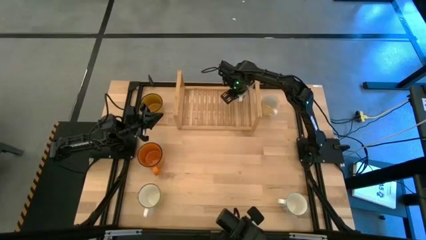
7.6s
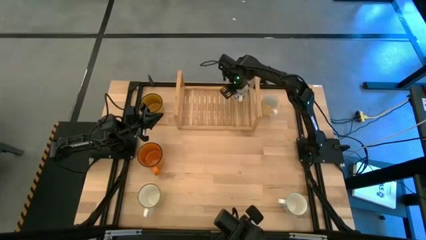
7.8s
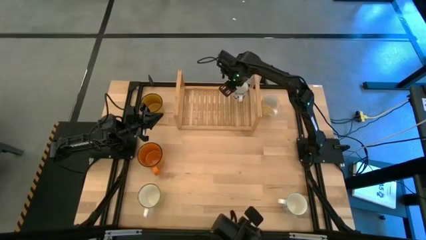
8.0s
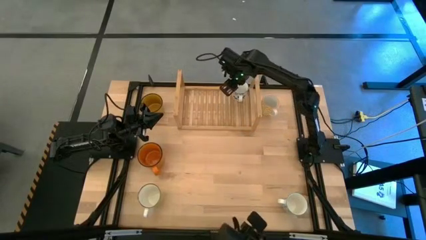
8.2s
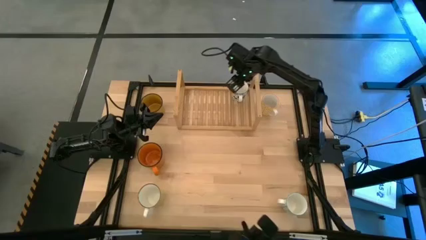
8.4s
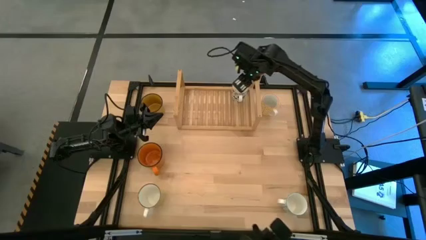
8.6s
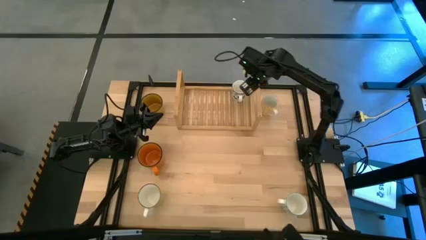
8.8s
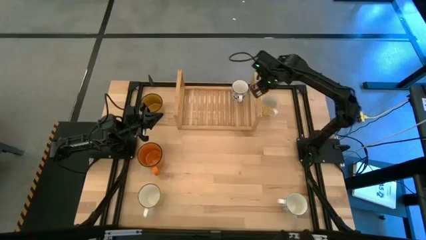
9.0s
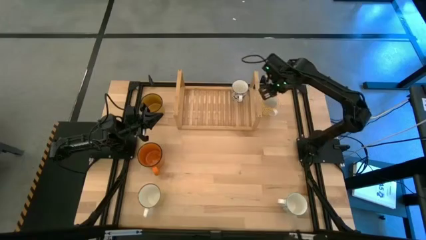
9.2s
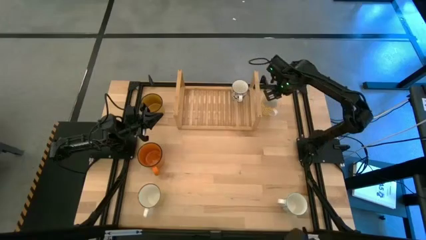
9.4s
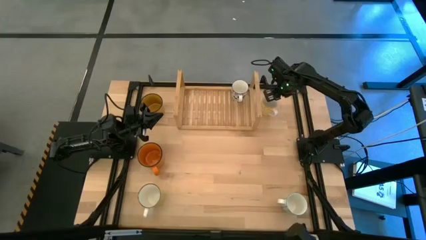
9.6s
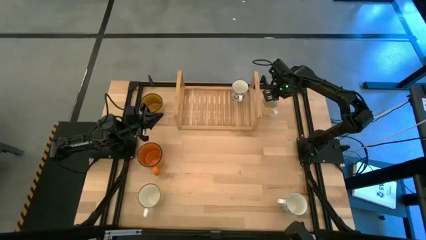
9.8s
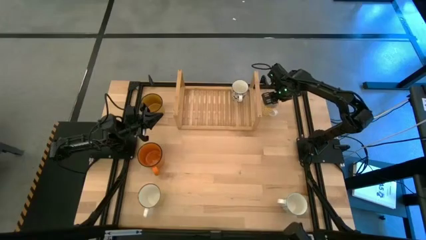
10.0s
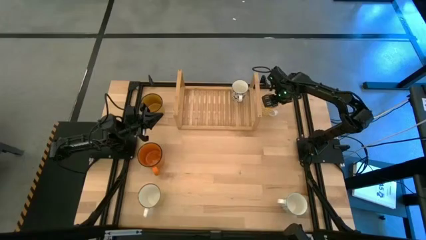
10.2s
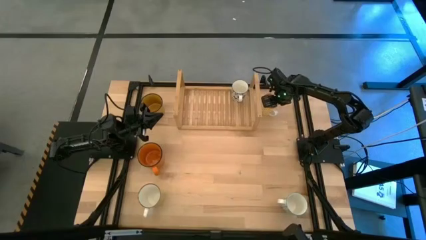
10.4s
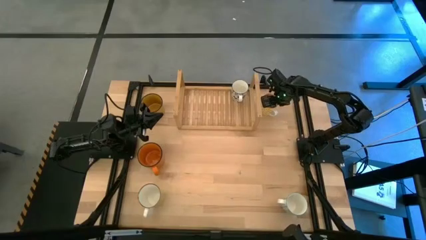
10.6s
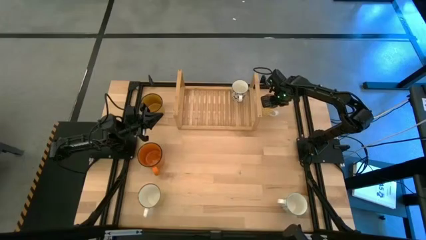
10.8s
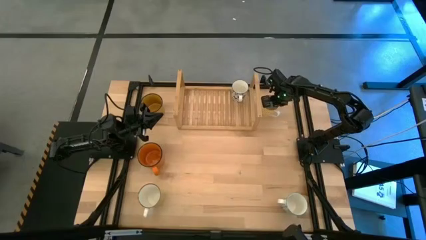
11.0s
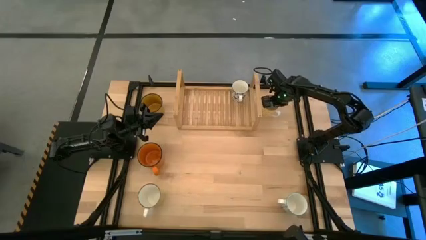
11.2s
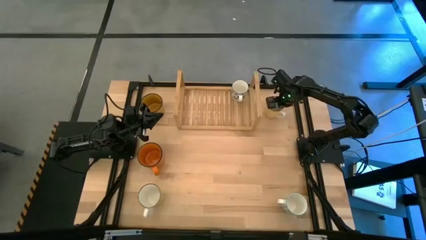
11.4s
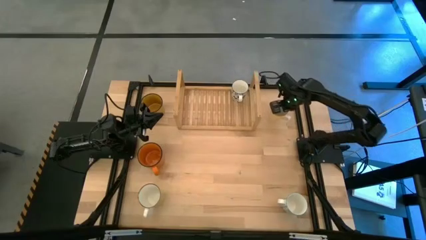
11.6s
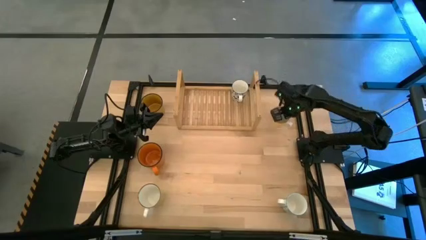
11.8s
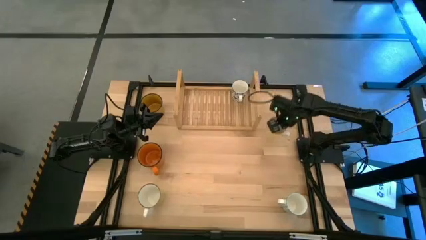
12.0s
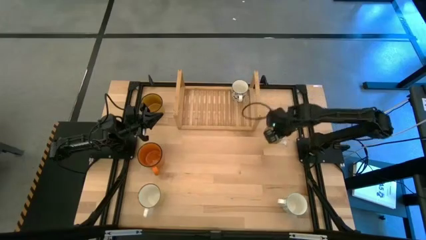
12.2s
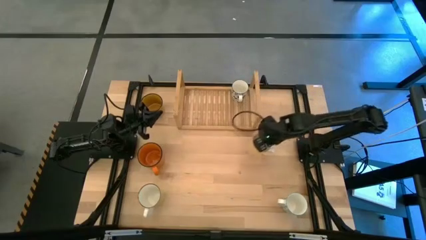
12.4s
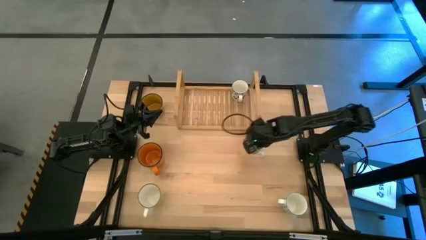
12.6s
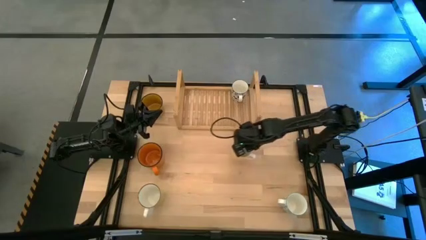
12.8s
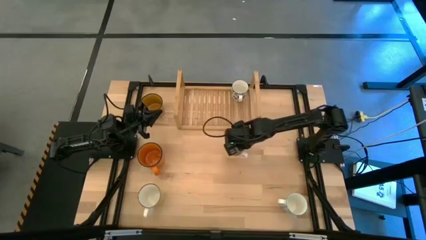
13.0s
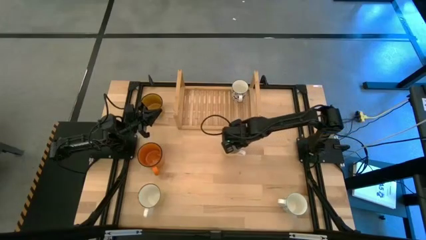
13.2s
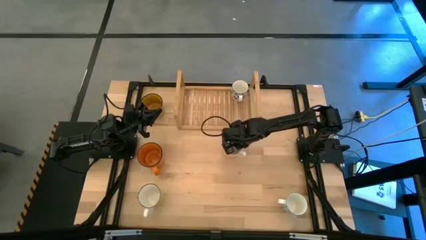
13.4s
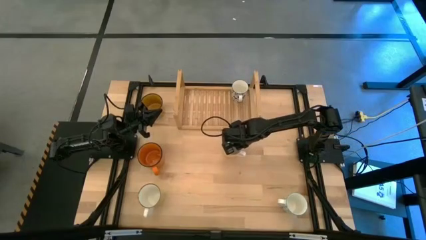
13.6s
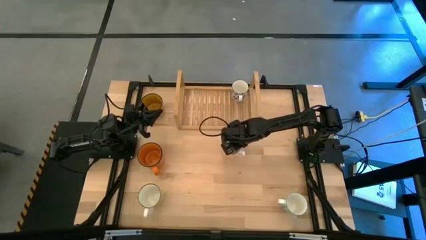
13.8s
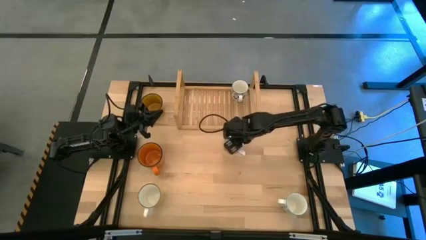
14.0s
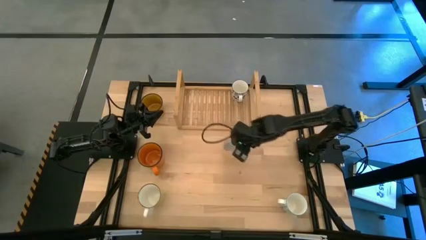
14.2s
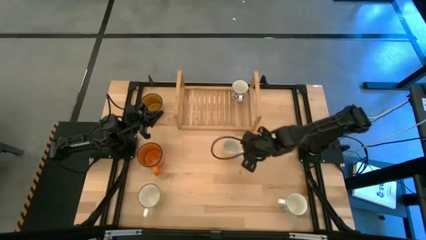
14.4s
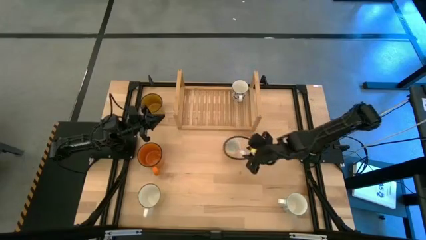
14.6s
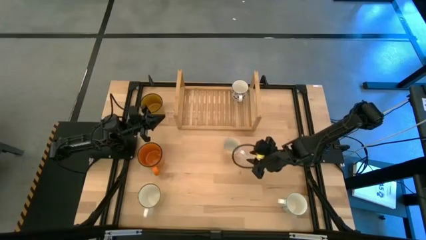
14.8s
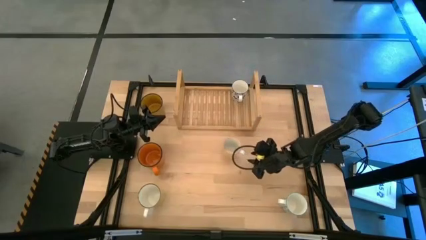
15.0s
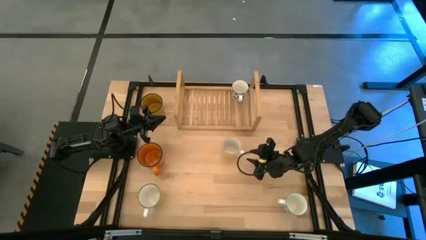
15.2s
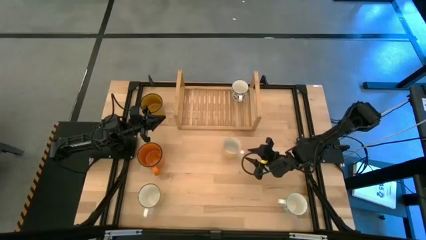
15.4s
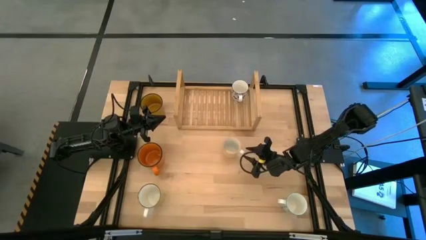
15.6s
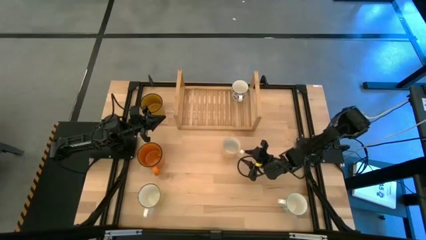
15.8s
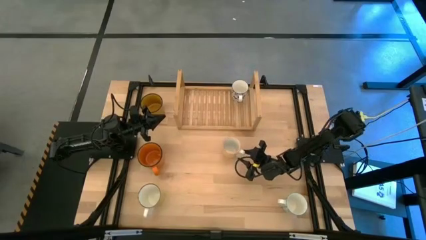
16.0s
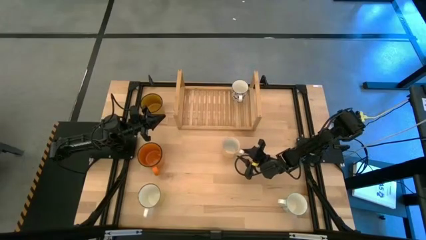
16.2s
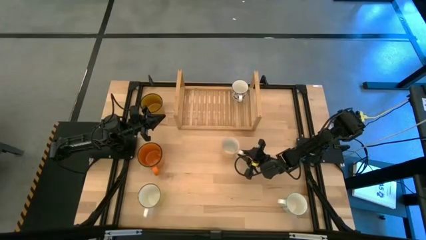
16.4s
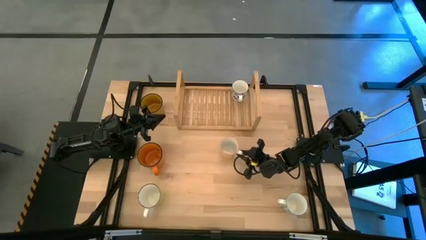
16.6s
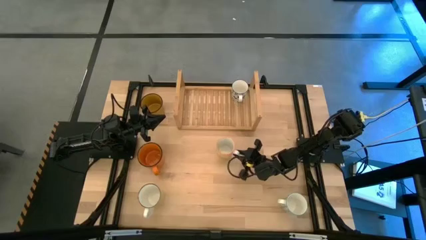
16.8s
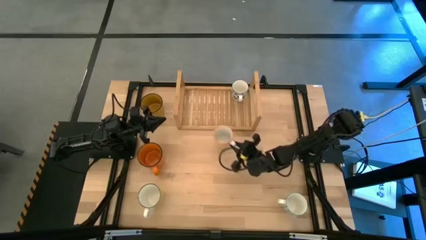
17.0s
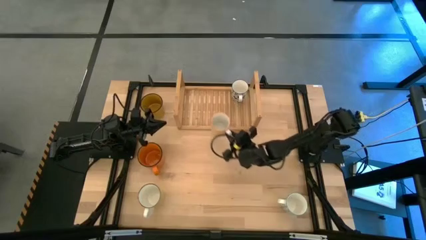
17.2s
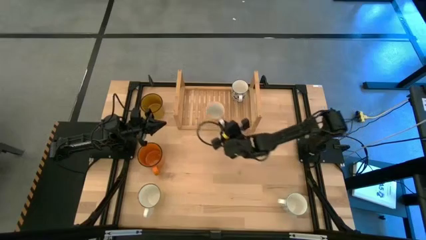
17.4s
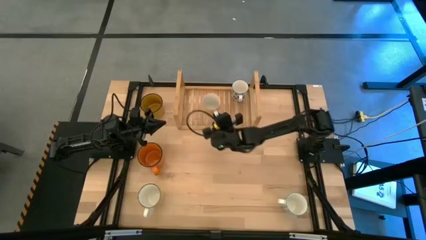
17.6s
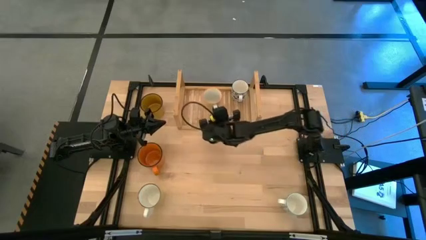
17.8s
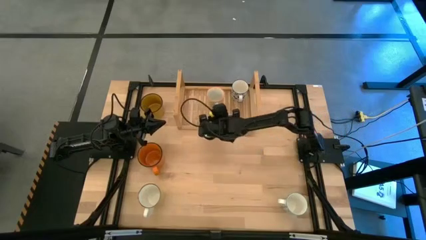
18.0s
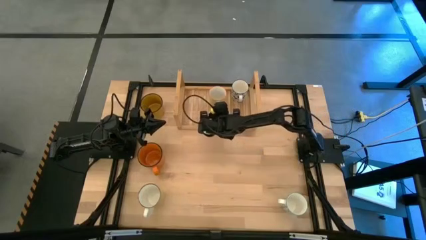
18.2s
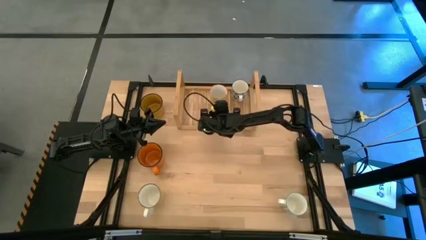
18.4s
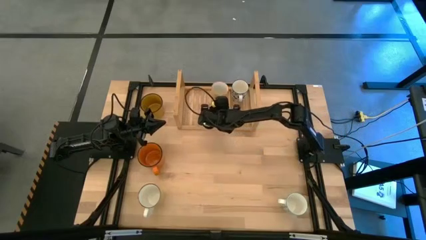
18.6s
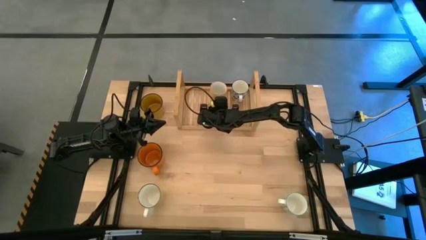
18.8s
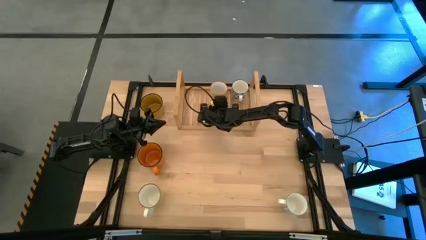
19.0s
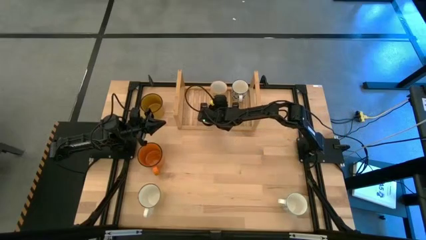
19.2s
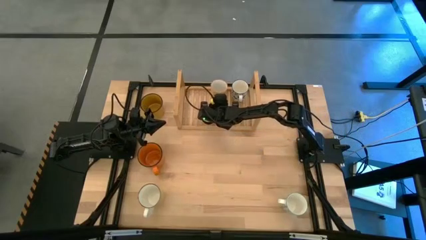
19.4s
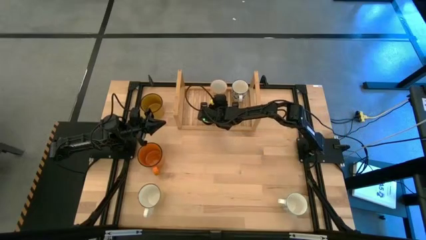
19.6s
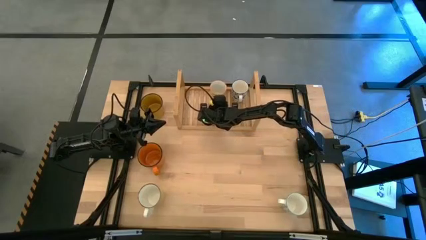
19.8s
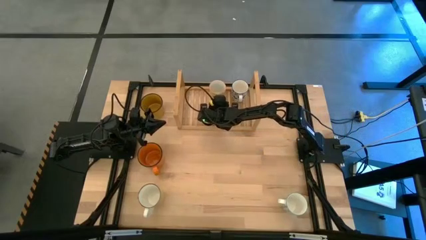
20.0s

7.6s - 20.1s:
Task: Place coffee mugs
Put the yellow patterned mug on the shelf
